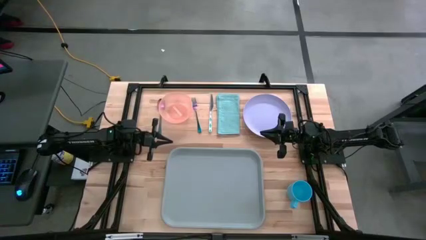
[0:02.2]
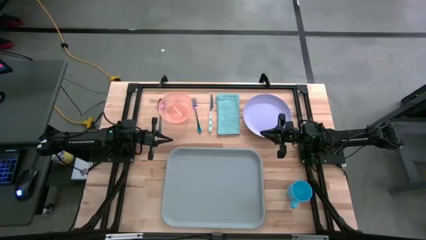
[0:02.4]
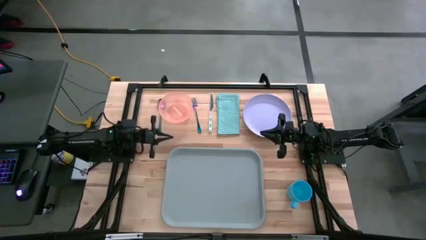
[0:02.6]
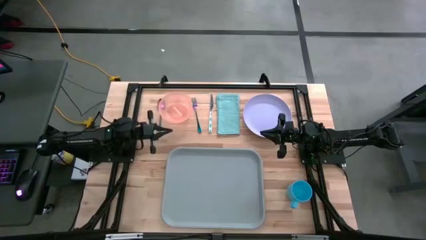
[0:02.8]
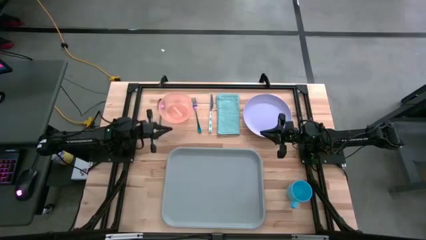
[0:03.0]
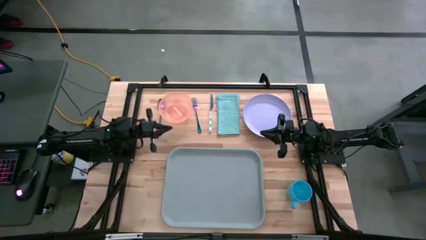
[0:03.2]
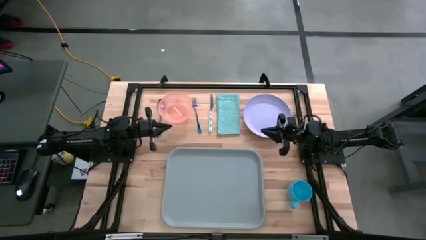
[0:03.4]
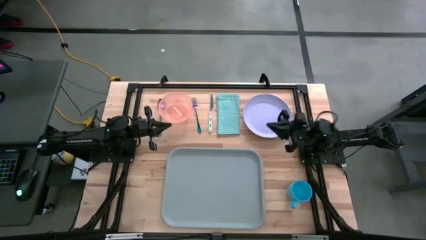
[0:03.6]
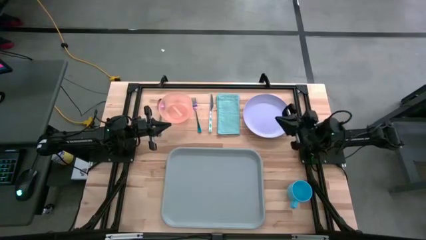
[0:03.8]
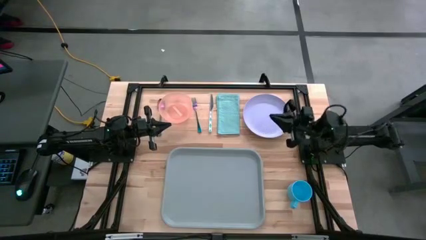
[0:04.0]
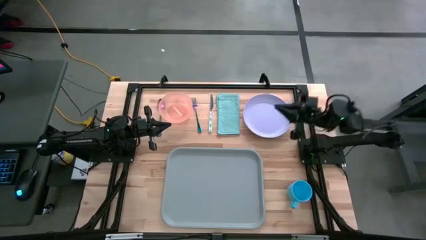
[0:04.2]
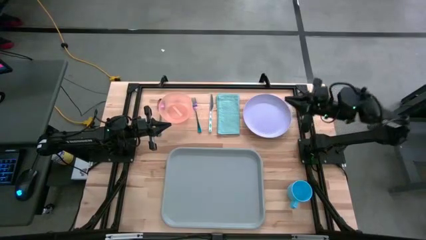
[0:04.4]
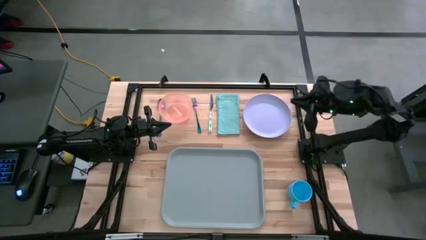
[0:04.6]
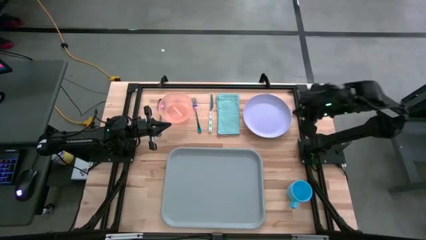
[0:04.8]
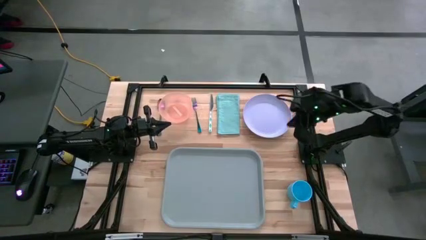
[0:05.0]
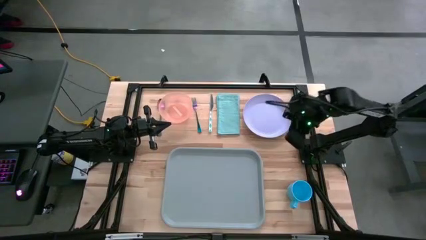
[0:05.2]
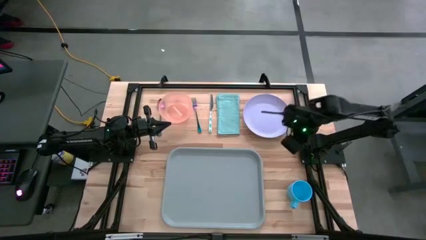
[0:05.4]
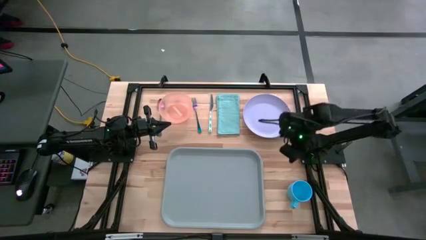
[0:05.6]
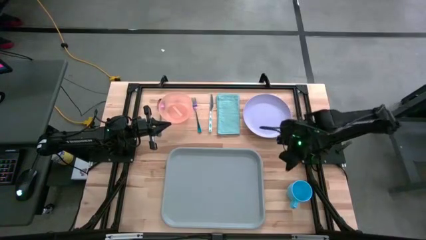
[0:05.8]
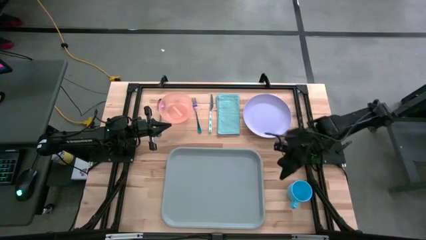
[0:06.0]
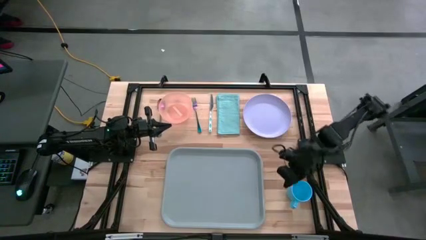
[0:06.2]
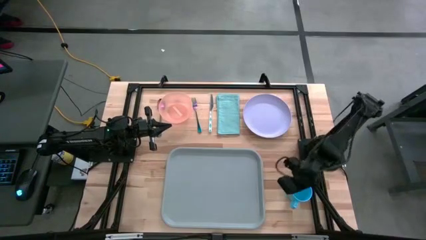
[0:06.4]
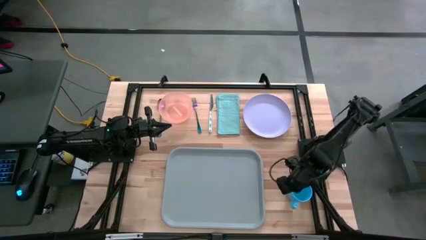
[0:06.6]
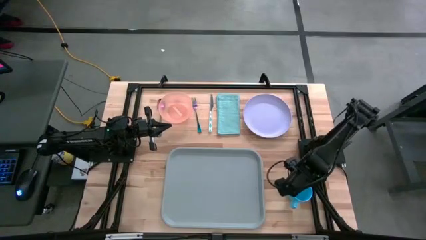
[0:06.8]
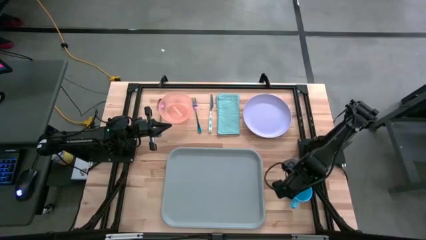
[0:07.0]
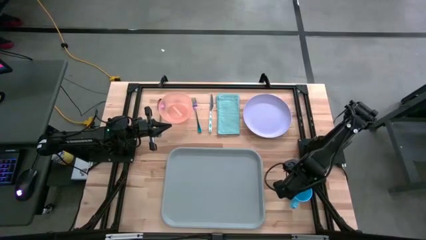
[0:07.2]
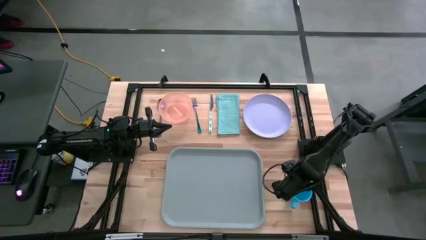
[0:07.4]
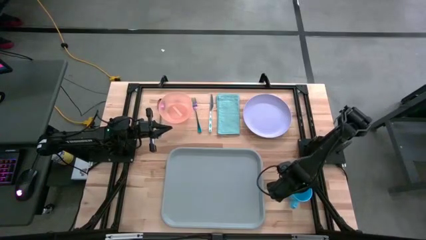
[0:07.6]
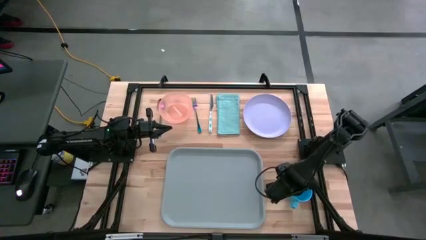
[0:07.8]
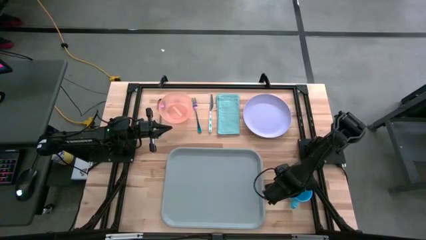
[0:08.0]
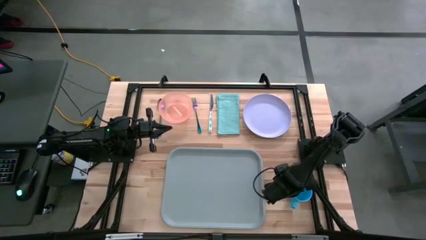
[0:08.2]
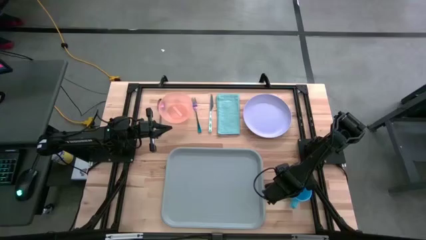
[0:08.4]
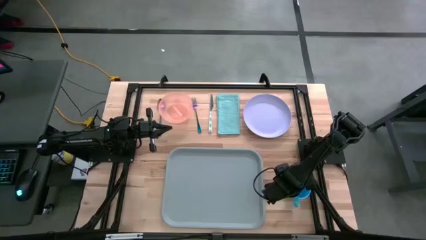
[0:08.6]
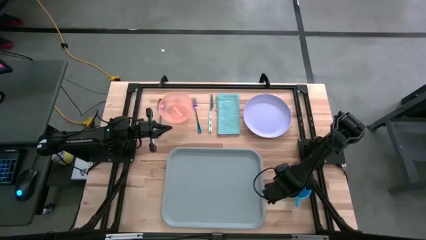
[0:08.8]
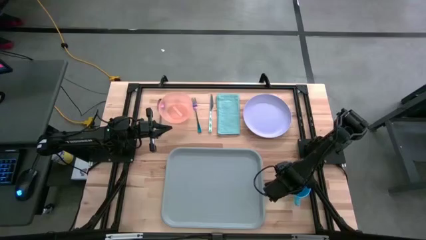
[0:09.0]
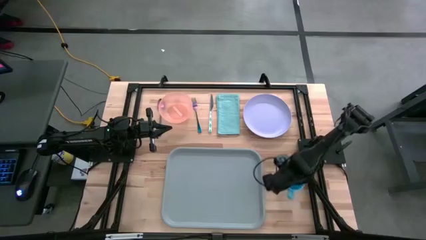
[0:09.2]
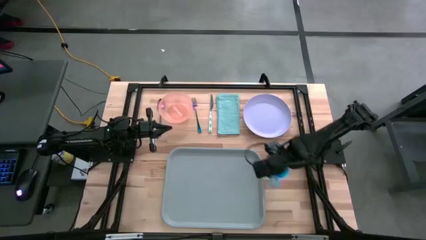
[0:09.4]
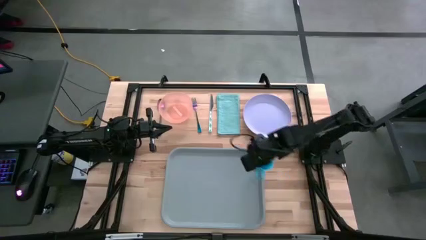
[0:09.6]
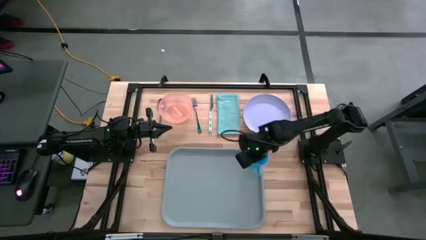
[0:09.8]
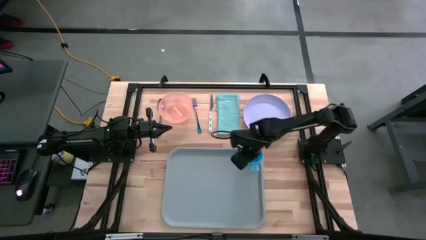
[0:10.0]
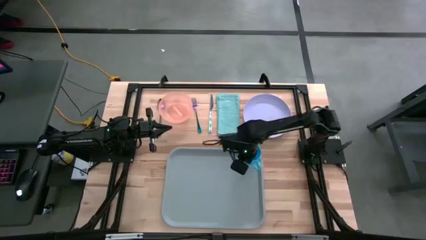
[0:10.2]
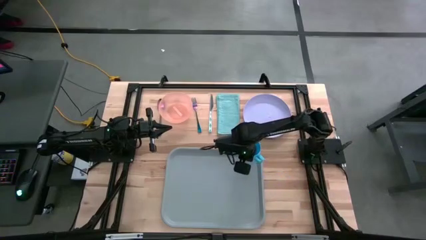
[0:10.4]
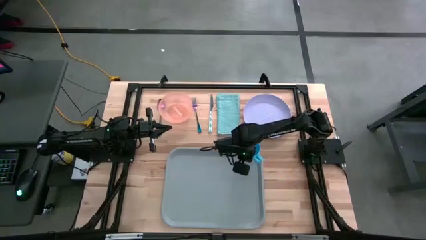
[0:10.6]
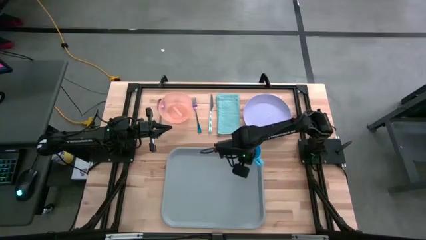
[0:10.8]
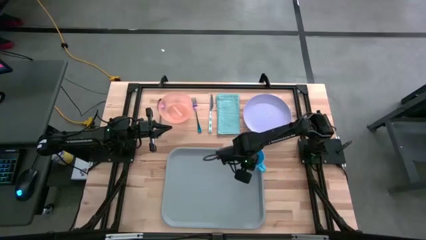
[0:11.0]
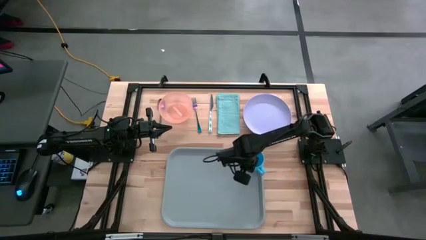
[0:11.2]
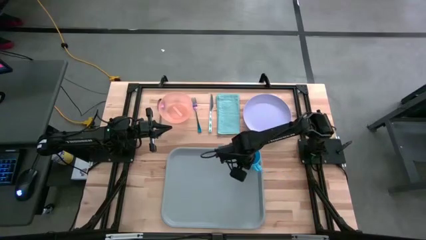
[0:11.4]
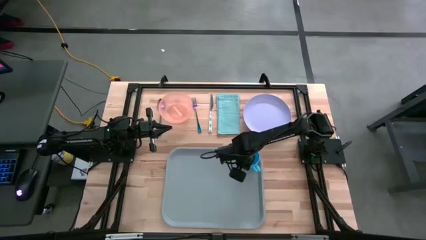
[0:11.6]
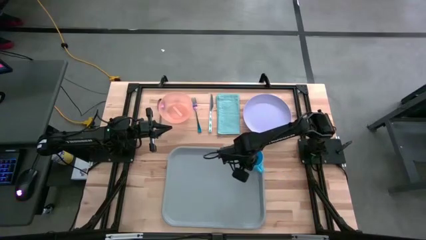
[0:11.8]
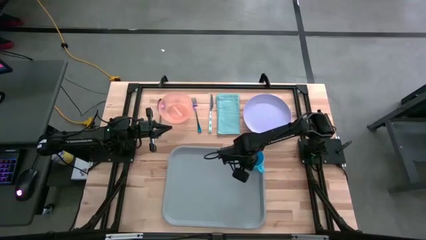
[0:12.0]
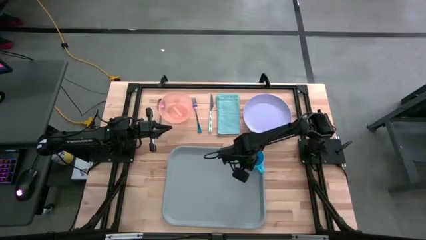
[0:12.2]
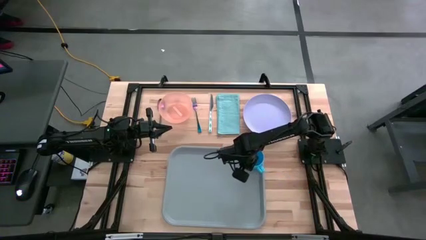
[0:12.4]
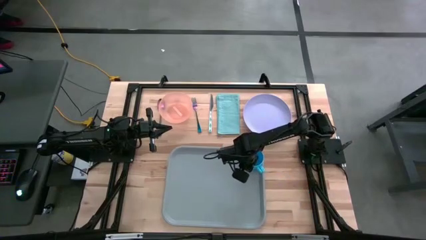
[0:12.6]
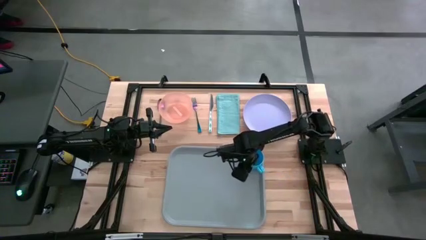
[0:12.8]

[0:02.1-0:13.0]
Task: Set up tray
Put the blue mug on the gray tray

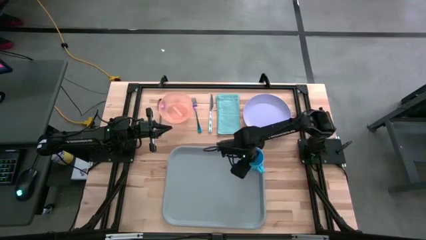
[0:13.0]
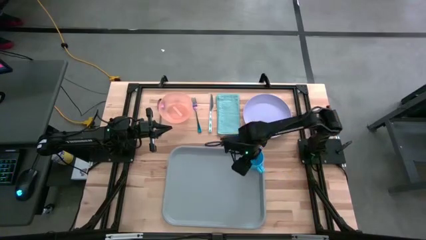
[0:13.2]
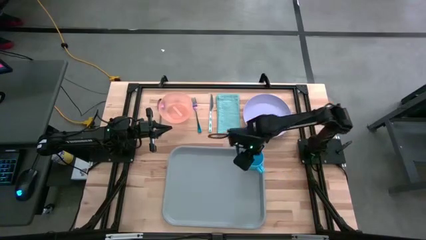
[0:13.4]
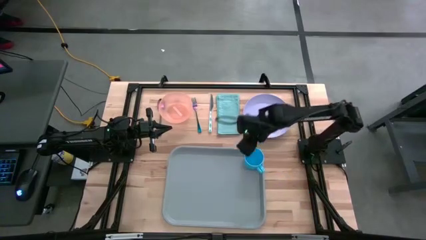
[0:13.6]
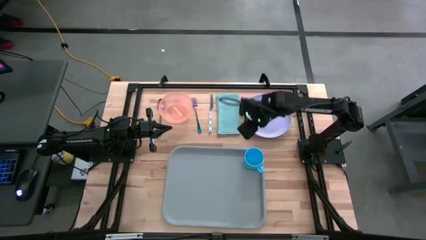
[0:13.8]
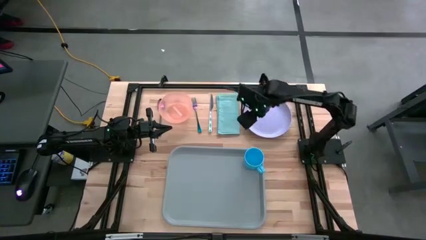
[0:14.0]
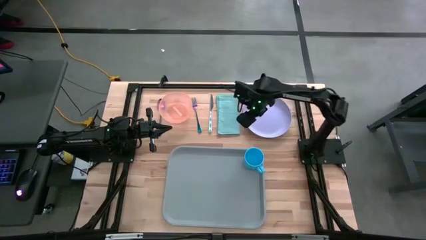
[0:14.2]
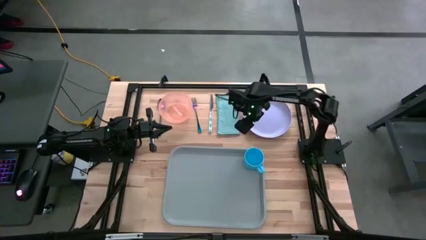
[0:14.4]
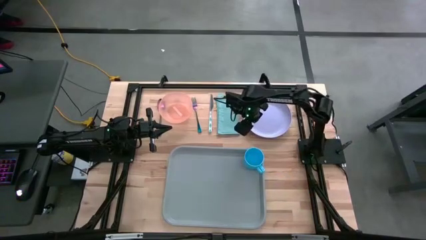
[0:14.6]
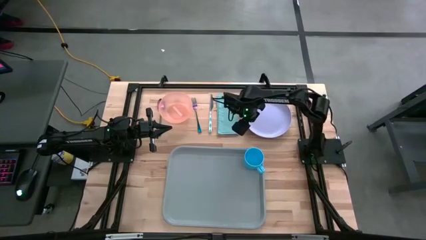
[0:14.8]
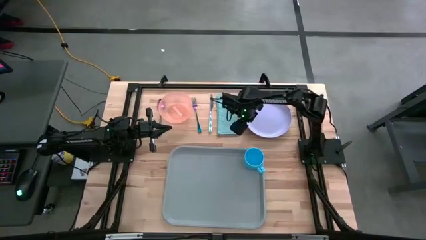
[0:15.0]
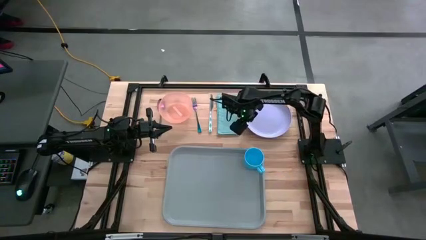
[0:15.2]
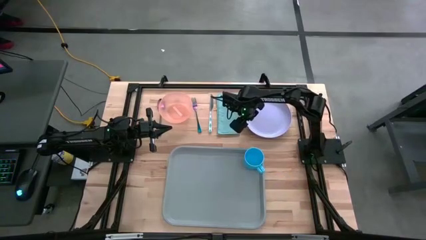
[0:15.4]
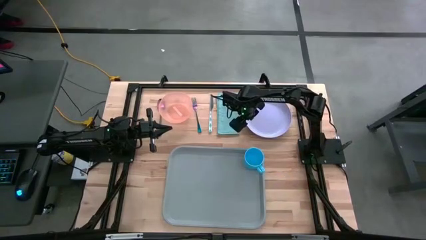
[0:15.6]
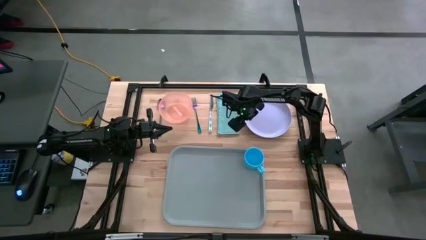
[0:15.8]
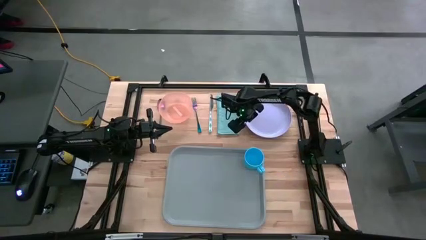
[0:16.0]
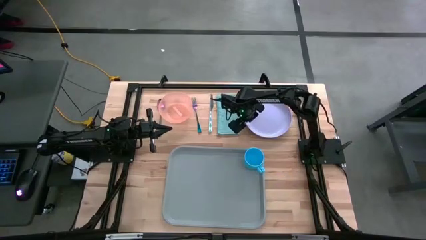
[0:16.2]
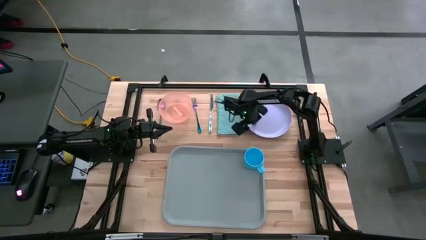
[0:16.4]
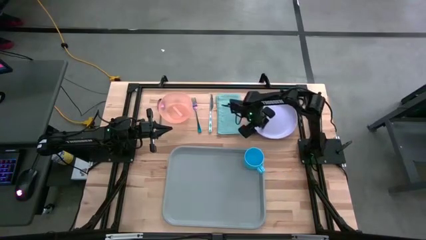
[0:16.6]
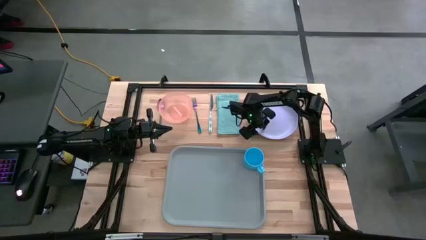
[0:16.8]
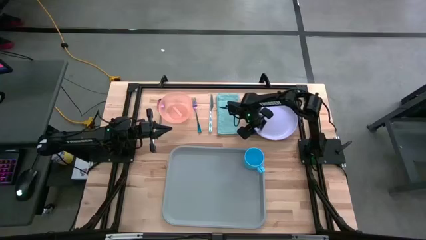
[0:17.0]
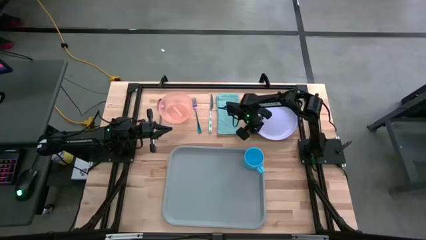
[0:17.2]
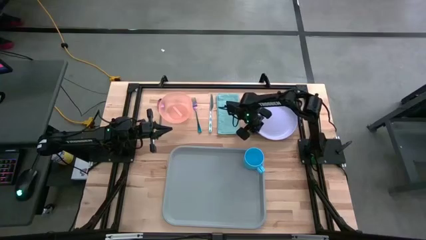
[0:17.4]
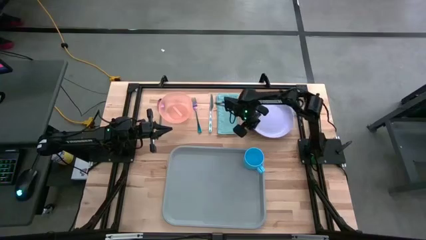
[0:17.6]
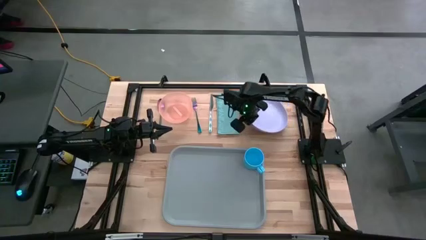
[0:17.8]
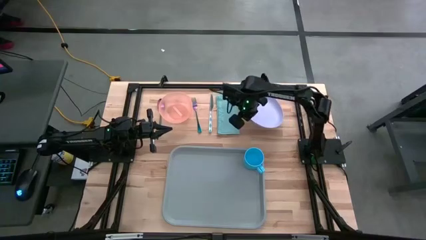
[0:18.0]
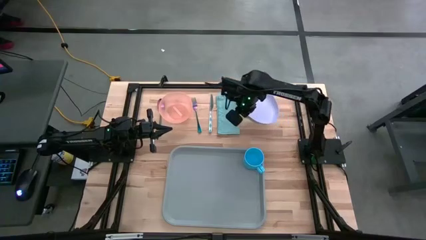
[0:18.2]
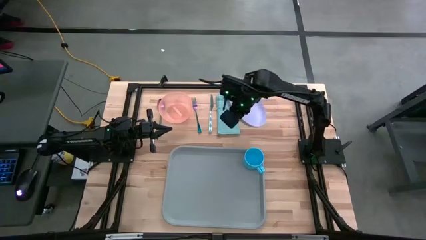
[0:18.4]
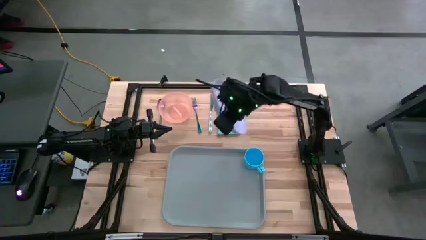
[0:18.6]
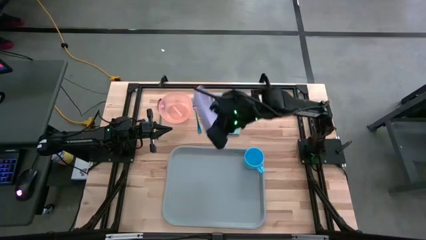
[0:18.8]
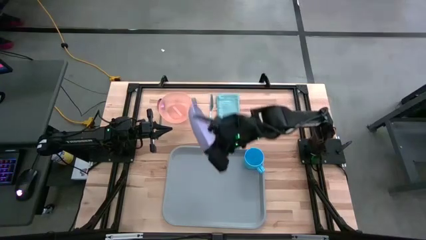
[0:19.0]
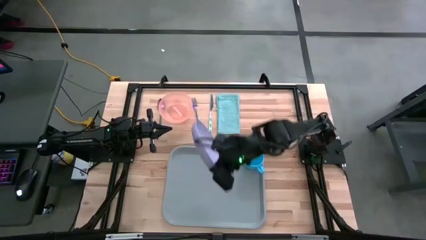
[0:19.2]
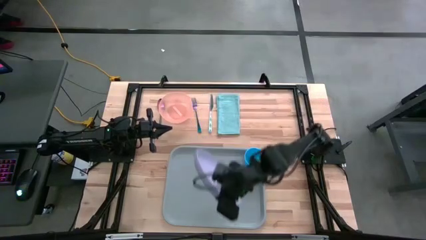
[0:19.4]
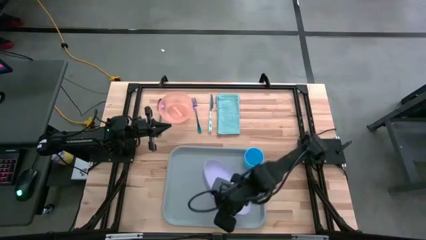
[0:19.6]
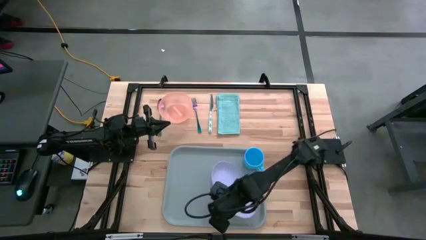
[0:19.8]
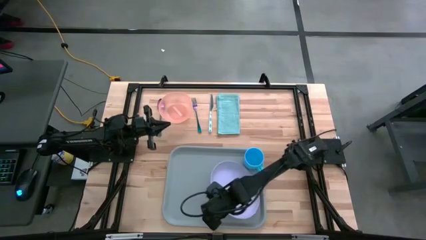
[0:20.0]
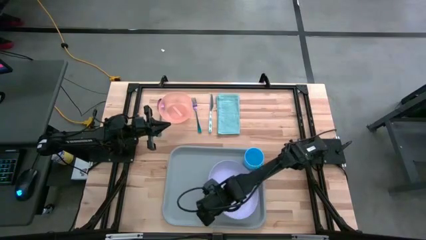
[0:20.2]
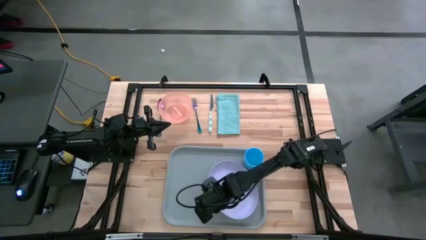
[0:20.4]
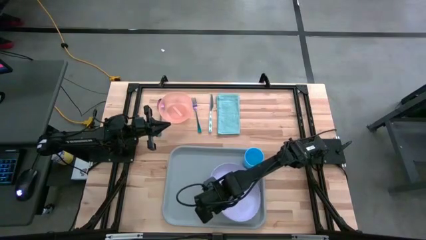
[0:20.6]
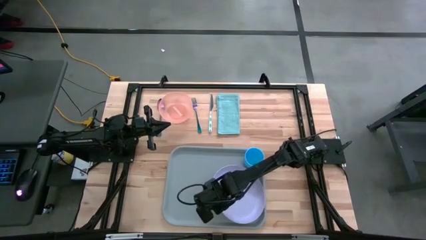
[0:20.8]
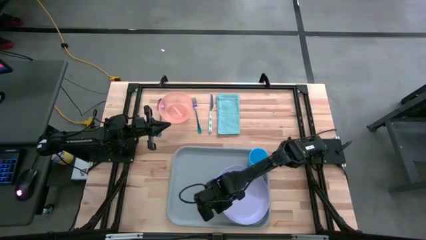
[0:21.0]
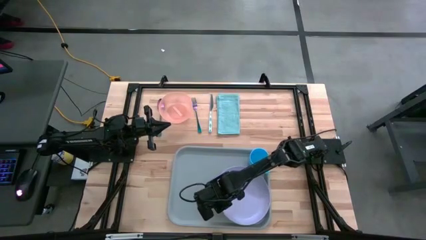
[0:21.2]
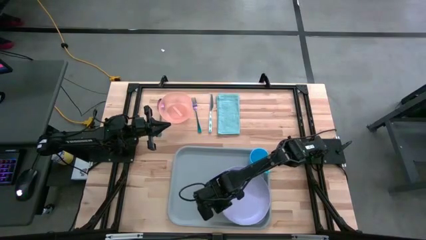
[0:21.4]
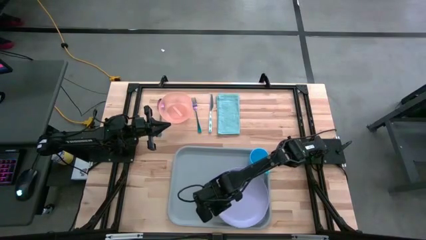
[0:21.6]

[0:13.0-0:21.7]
Put the purple plate on the gray tray to the bottom of the blue mug
